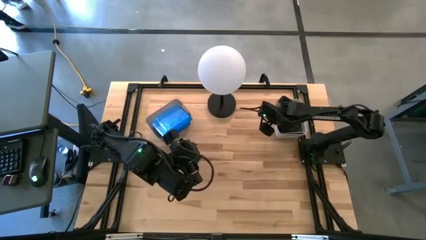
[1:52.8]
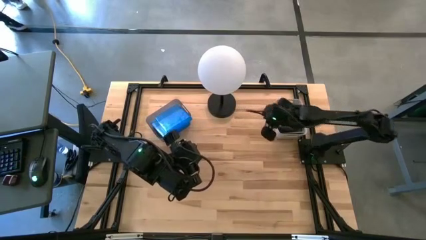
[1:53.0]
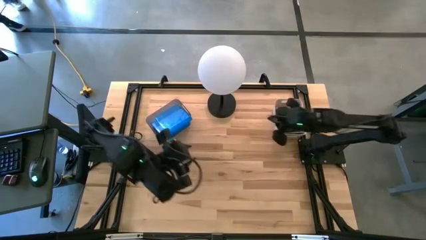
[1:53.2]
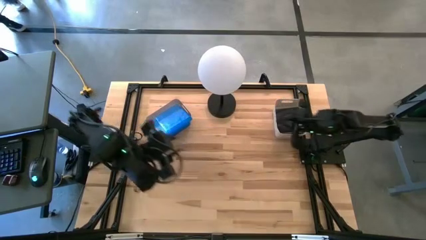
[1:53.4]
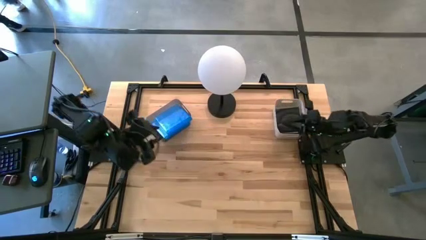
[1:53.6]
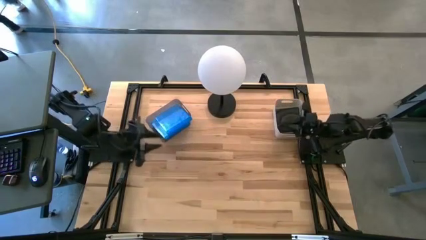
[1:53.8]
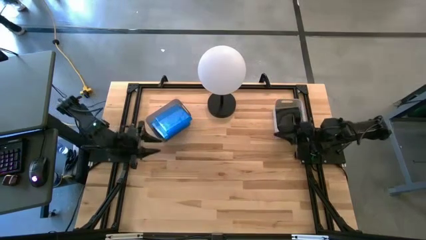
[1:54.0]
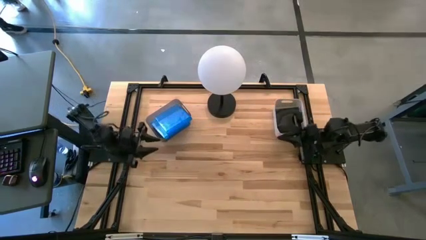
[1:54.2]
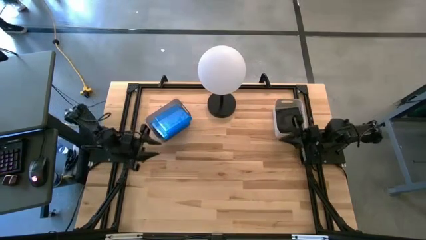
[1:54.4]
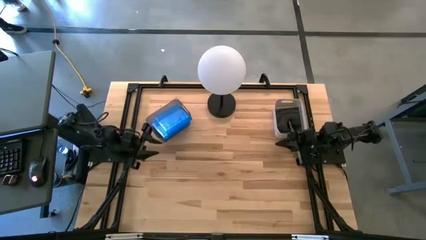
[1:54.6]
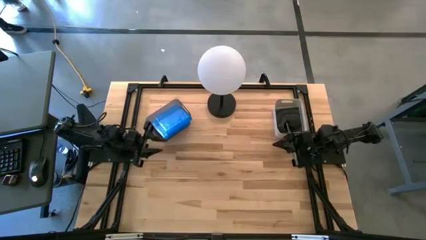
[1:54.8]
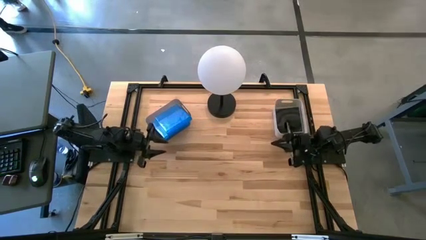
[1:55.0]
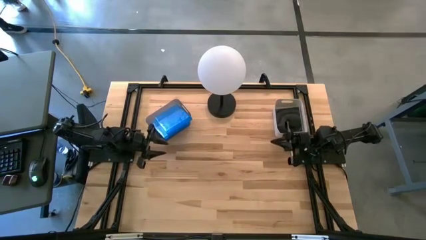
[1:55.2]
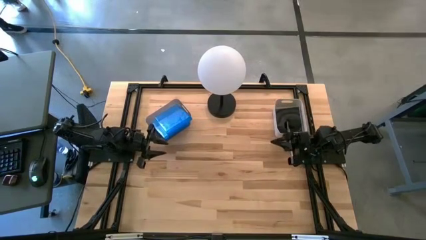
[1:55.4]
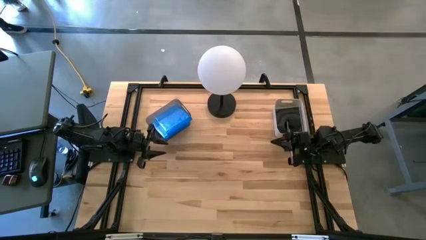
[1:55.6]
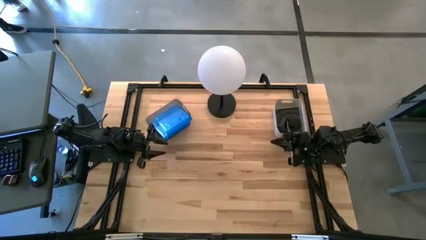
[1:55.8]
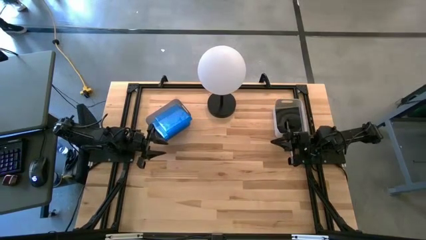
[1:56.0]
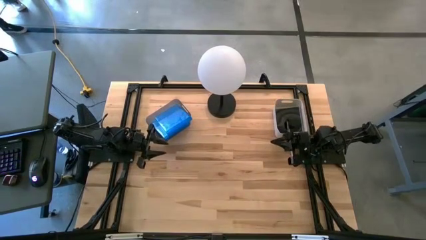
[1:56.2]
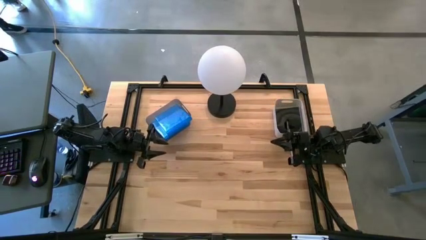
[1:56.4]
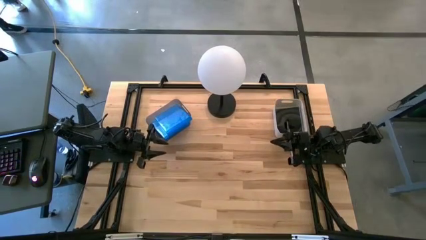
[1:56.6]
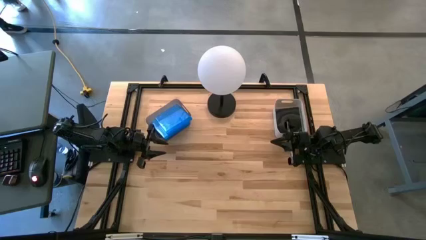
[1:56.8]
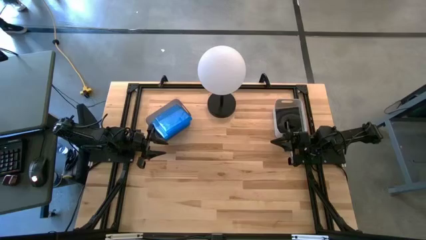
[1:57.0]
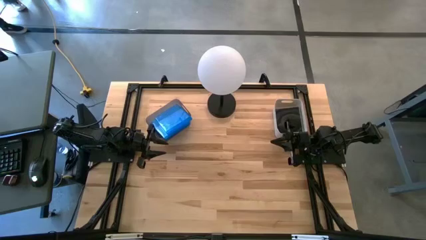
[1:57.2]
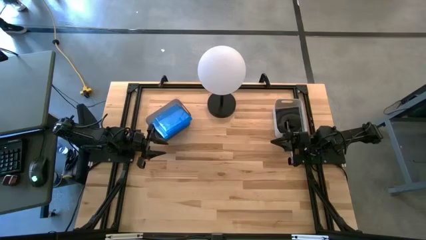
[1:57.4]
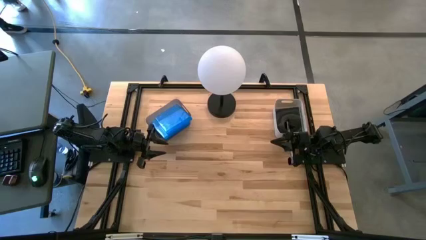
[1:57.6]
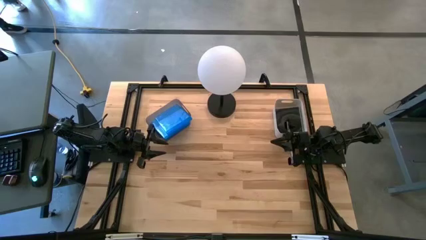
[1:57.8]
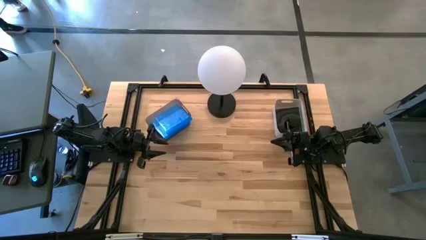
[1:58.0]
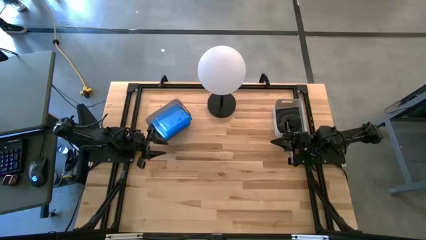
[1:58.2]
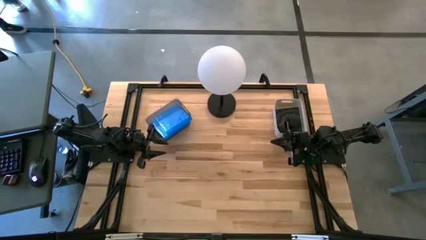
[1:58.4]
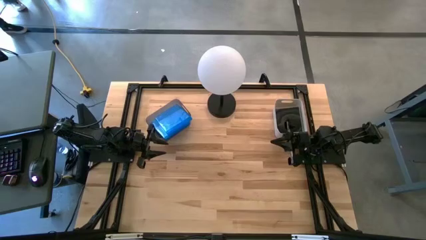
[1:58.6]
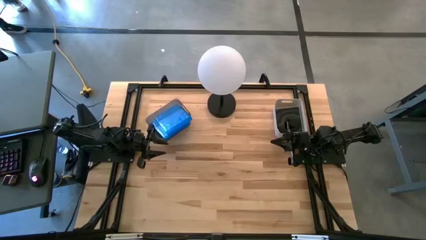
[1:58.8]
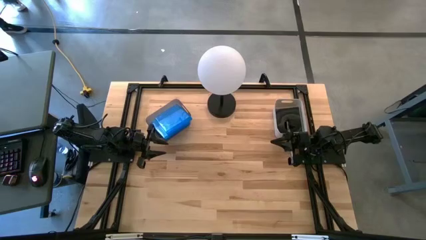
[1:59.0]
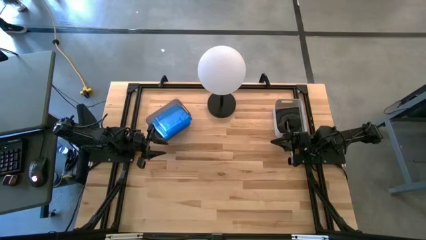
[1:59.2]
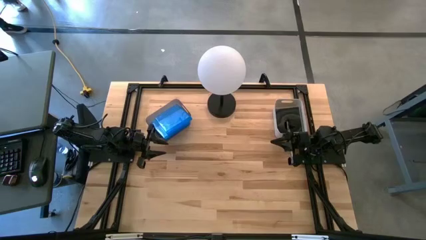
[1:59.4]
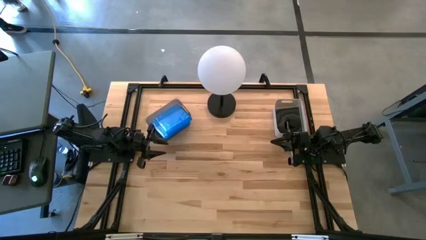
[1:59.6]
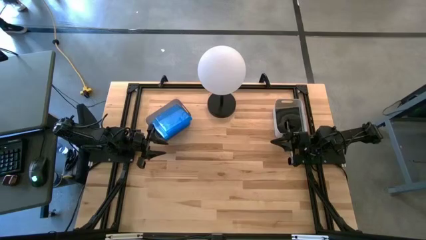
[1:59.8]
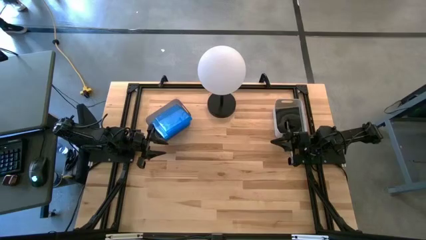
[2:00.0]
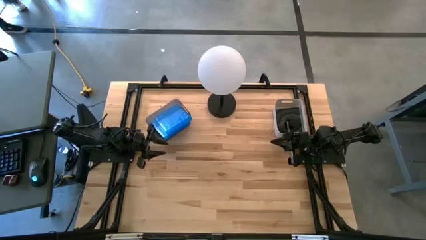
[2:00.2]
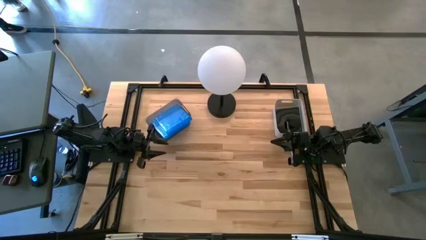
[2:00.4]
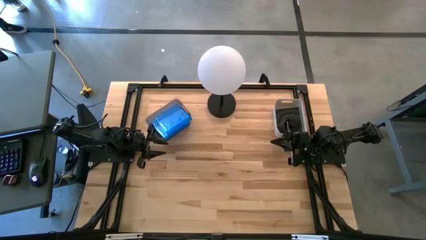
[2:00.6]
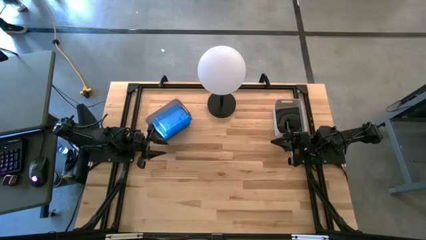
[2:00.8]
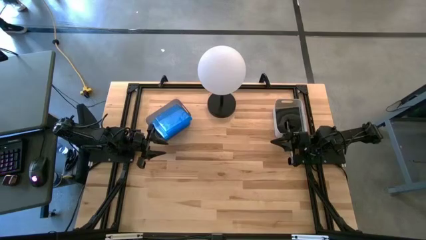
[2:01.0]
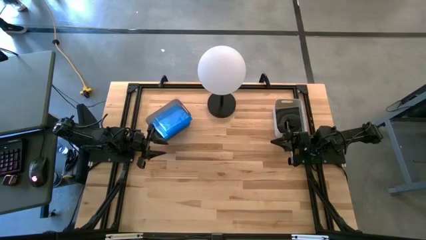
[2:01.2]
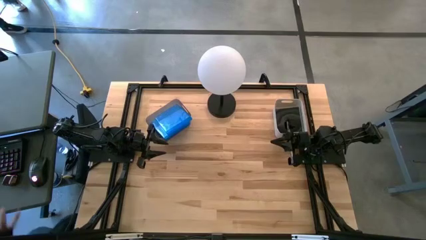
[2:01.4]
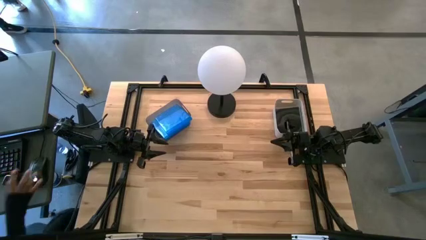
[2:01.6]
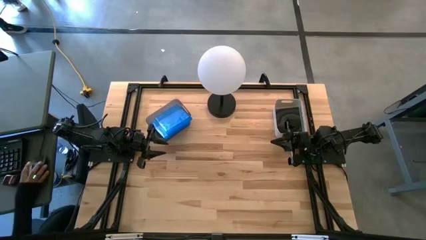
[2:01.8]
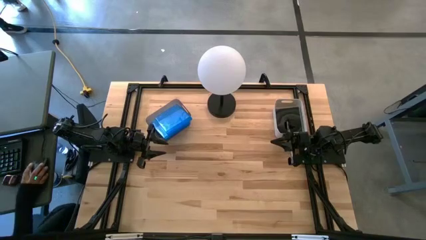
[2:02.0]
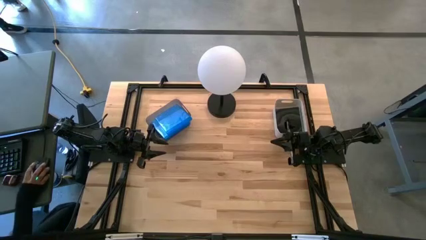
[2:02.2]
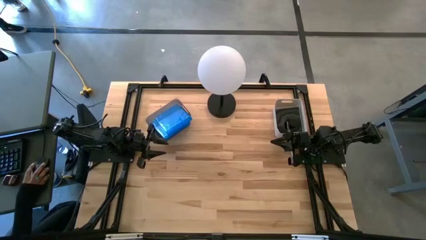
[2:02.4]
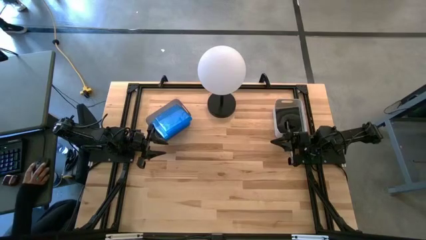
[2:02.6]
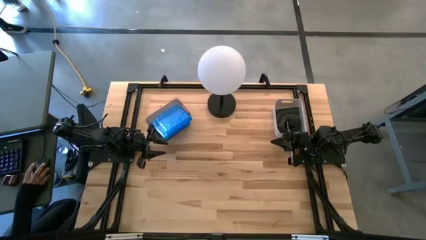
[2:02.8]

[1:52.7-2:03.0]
Task: Pick & place jewel cases by type
Return to Home Position

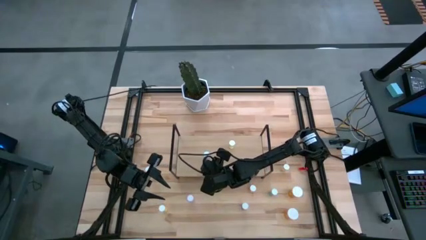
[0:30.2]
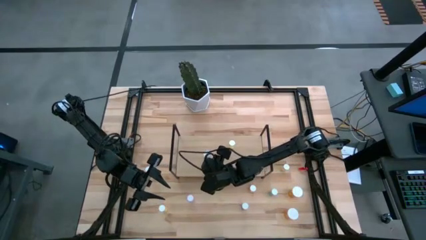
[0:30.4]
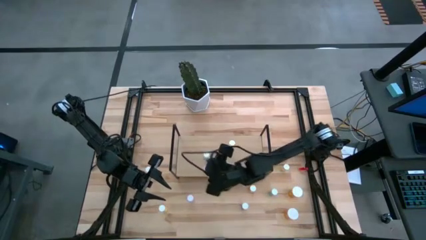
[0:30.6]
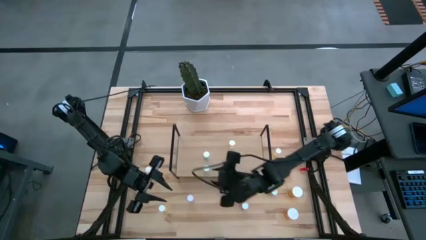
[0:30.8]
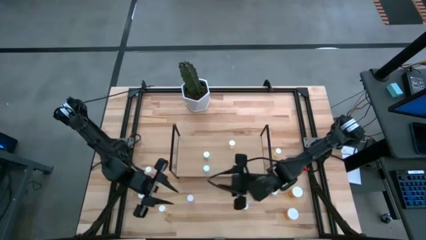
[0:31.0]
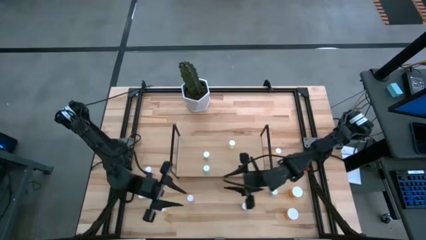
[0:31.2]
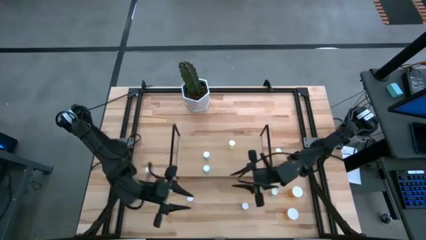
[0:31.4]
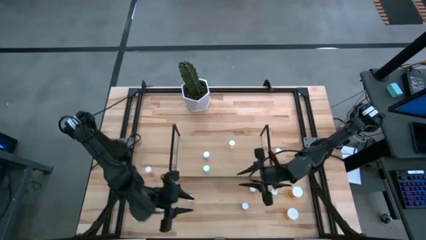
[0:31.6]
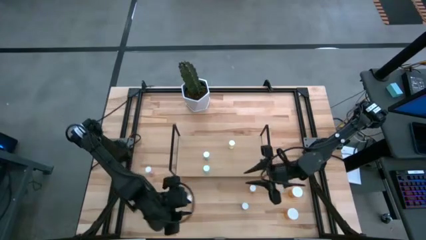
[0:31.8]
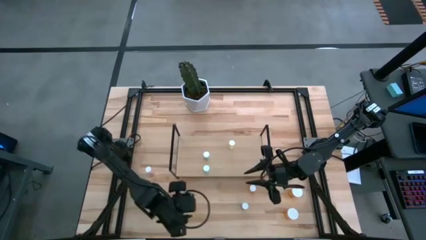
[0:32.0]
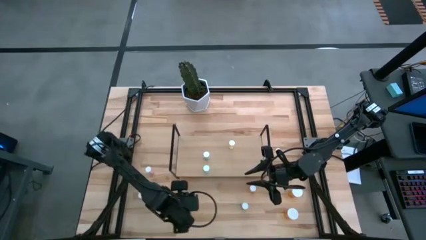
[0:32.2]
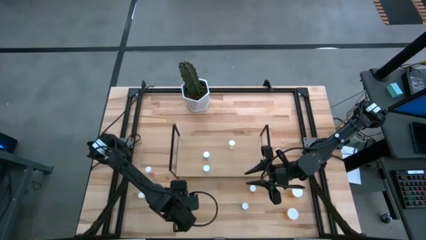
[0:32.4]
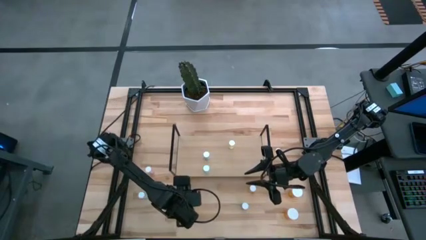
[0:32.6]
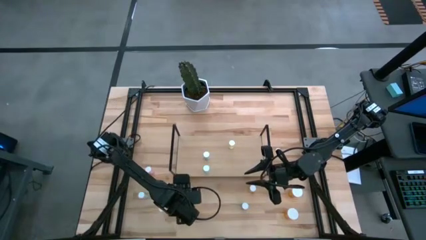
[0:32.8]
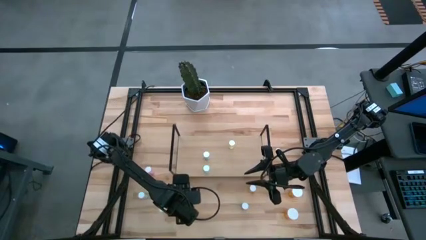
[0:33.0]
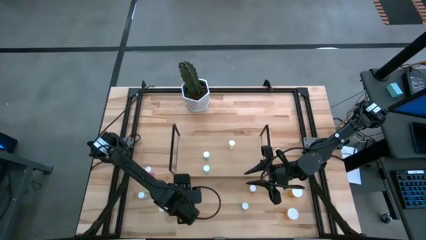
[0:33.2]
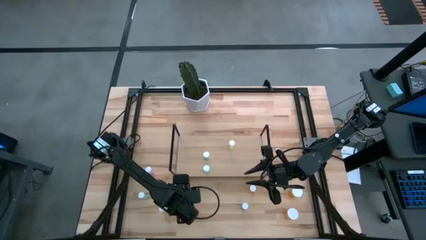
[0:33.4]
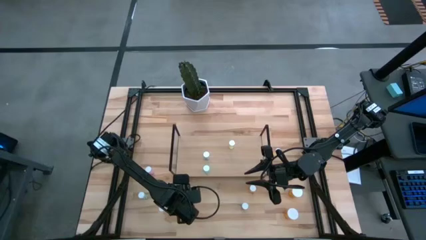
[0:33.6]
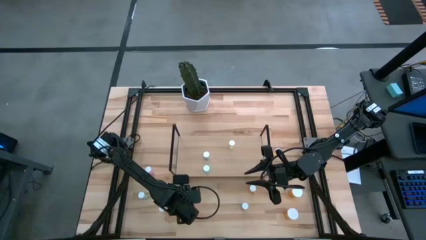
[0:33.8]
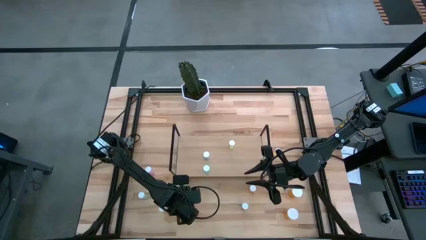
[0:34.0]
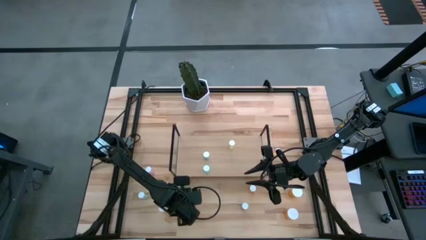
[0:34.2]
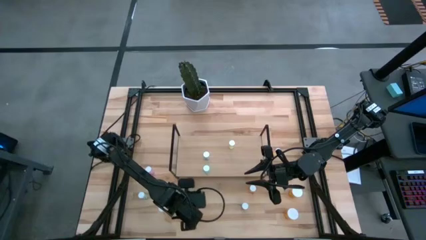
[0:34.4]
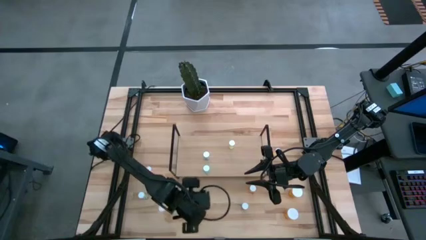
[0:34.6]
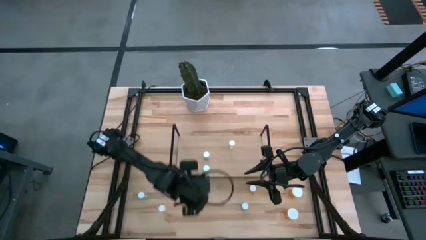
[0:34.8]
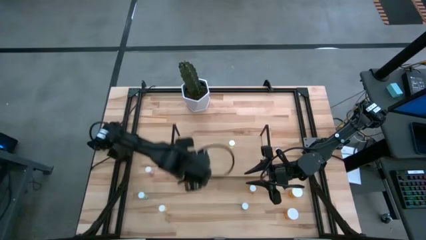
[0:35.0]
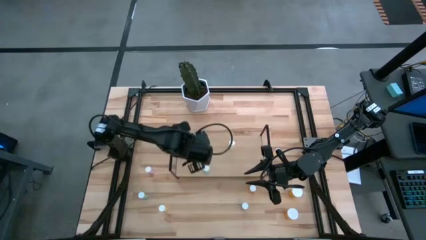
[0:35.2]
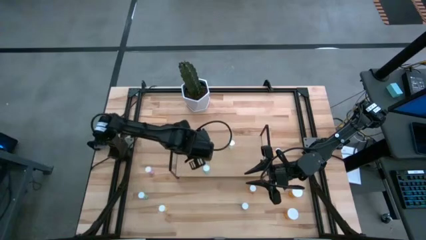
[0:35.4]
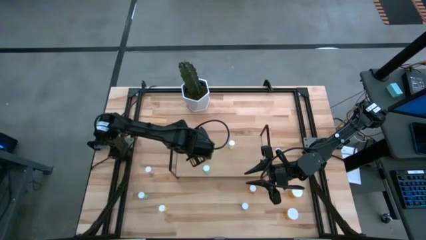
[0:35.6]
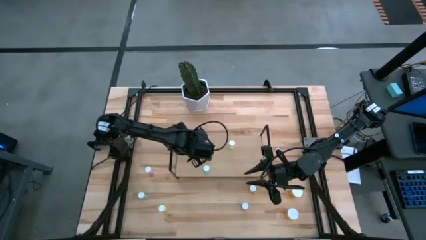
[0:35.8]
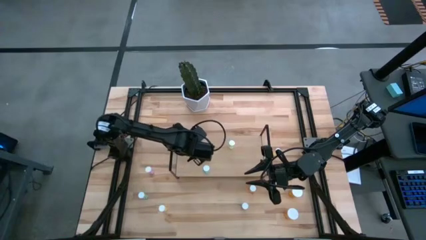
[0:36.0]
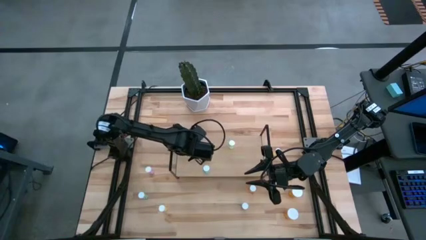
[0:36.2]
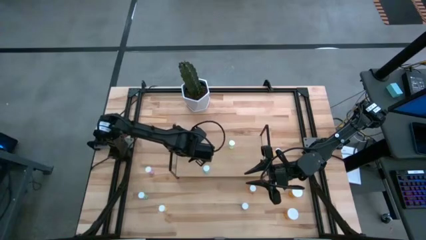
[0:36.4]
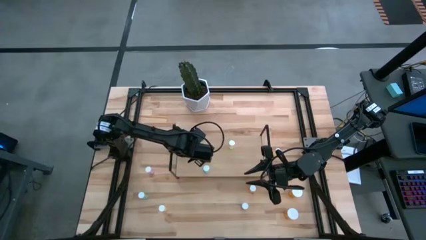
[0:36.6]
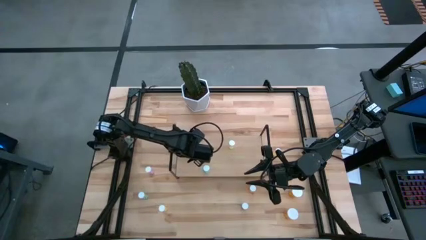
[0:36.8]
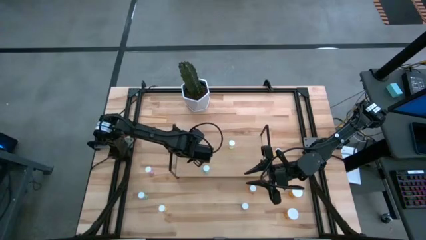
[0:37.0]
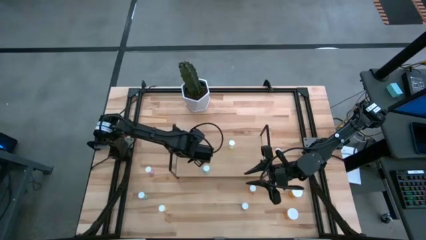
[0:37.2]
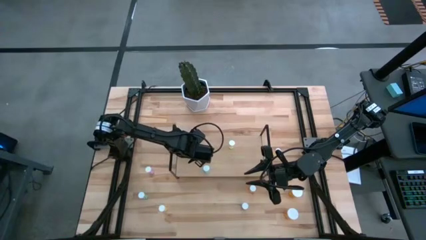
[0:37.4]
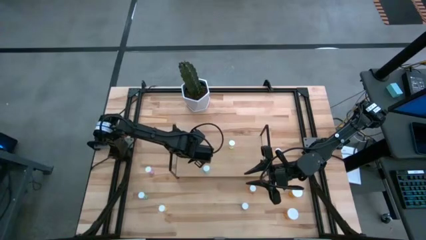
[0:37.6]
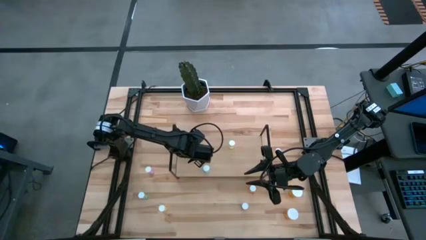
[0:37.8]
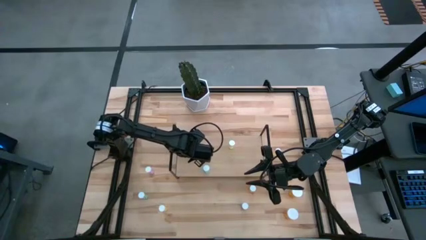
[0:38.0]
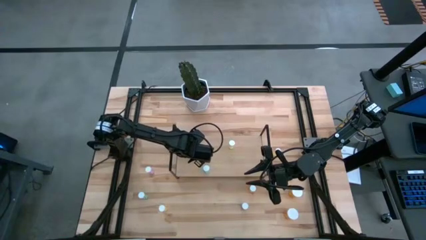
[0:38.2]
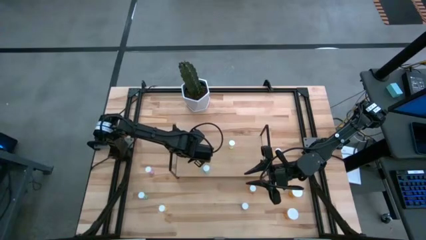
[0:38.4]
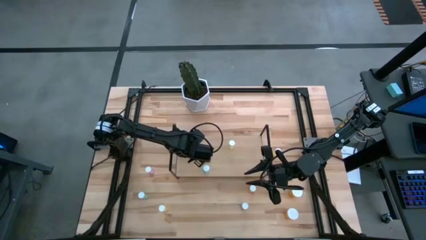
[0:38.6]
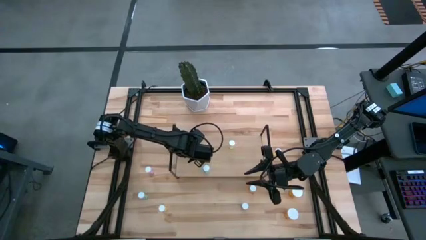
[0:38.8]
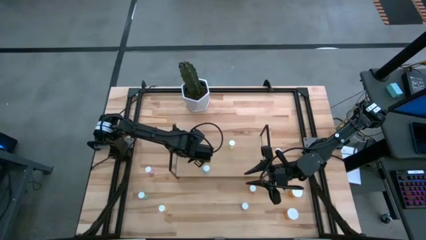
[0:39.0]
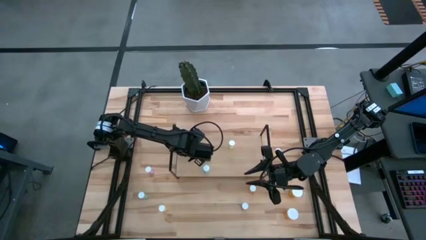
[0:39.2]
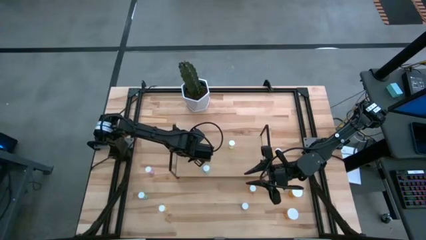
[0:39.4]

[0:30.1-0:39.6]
Task: Pick and place medicine bottles onto shelf by color
Put the pink pill bottle on the shelf
